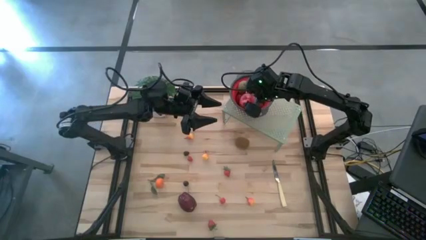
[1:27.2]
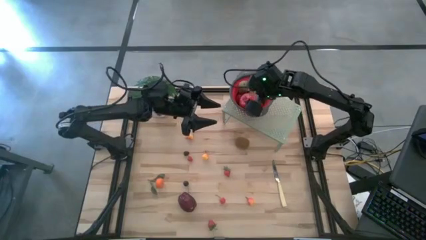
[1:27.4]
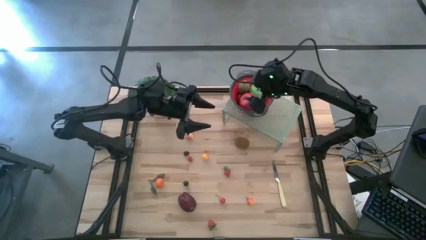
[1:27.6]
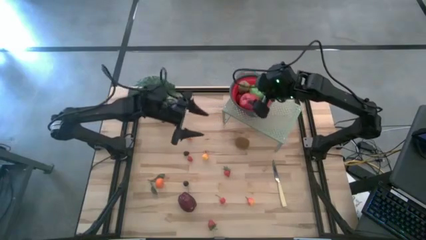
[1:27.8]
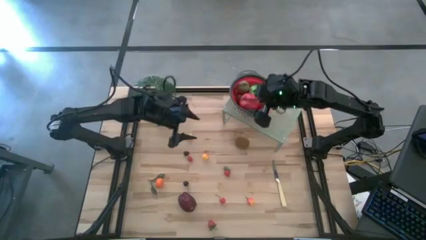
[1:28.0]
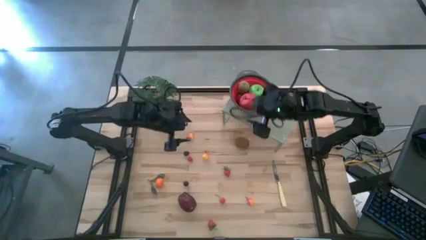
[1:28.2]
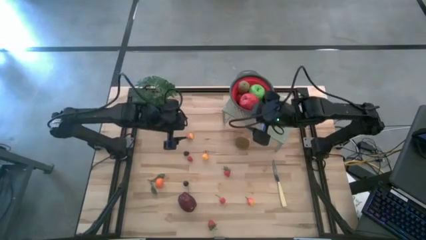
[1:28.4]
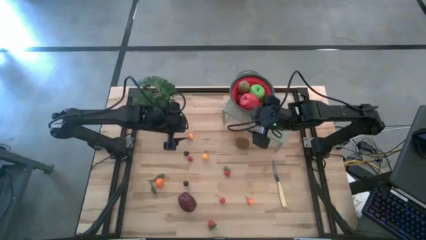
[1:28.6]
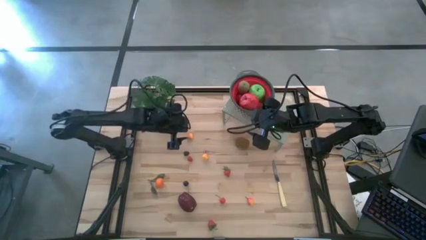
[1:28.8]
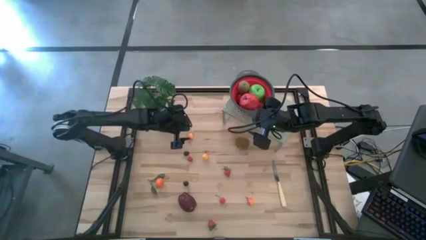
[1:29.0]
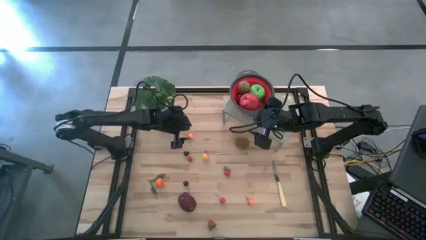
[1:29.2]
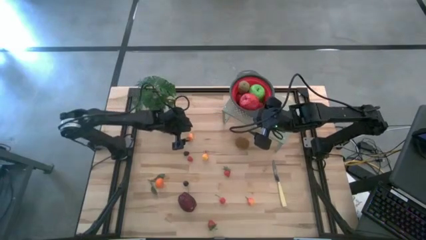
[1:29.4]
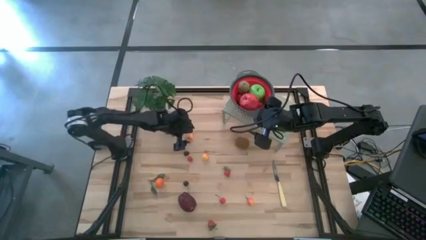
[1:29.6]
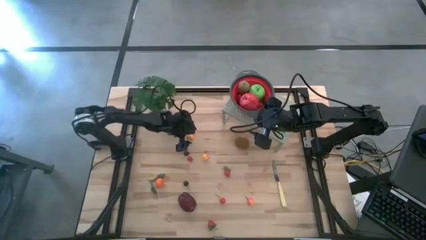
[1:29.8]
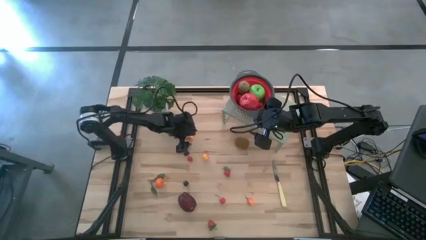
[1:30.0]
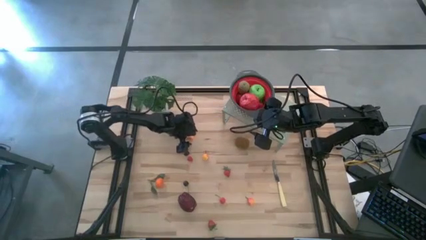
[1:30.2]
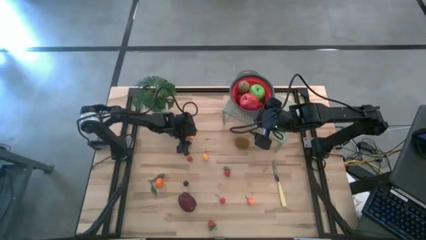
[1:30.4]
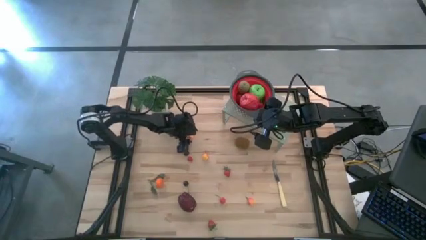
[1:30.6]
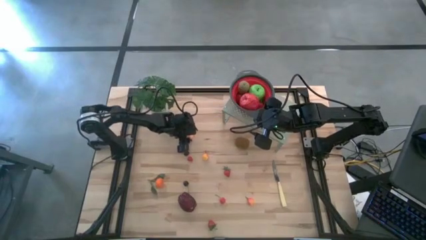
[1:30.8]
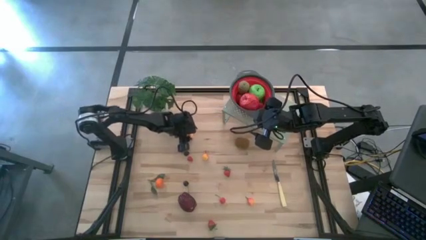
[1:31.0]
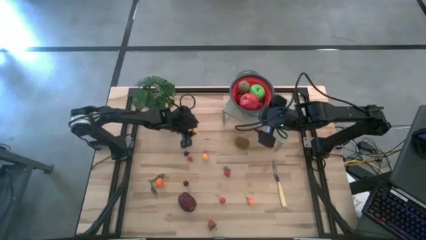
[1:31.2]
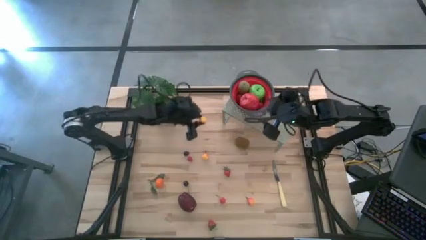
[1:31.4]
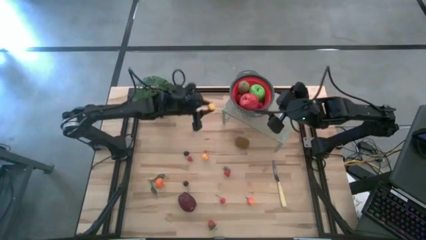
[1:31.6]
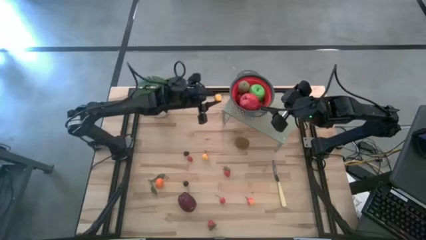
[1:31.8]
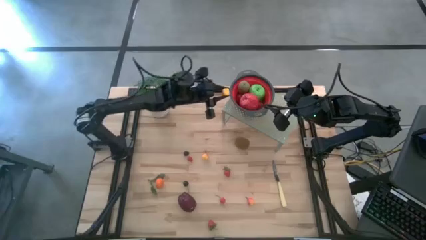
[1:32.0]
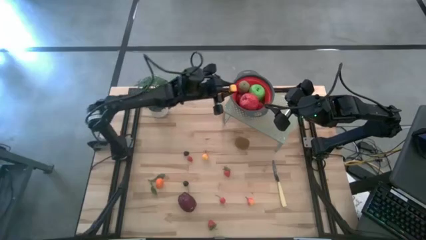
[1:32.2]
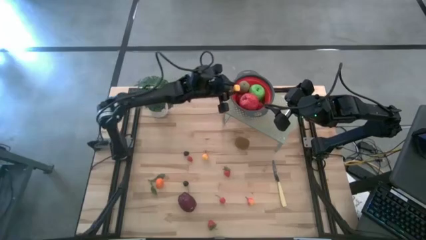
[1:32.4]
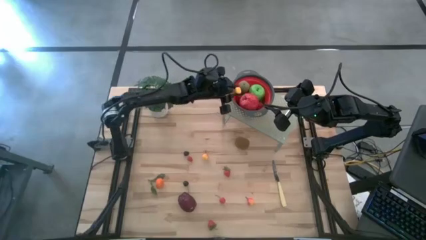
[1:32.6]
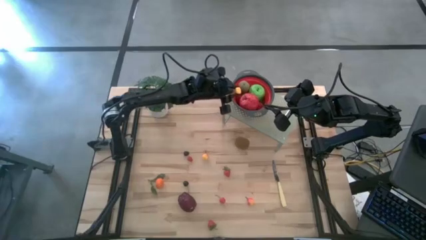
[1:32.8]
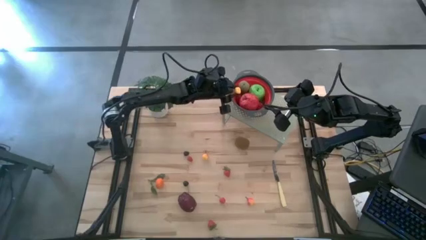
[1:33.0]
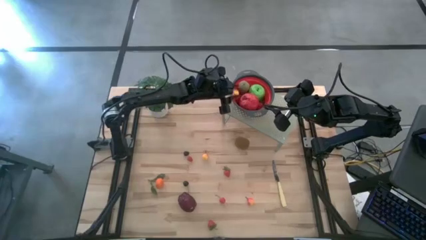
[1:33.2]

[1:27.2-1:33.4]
Task: Pick & Place Fruit
Put the yellow pear into the red strainer bowl

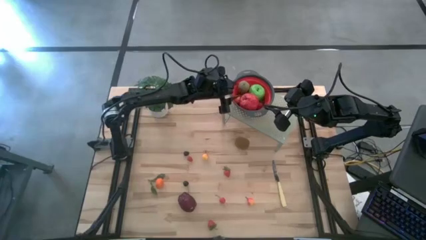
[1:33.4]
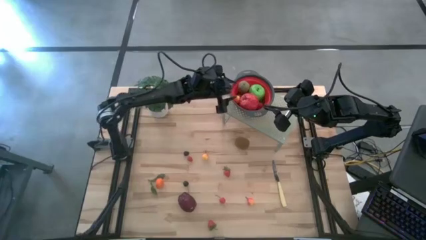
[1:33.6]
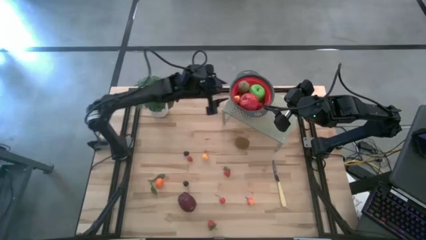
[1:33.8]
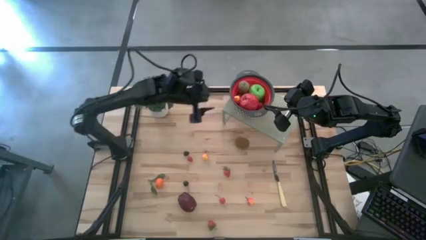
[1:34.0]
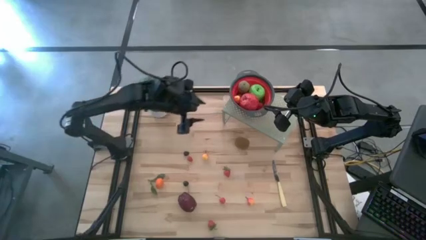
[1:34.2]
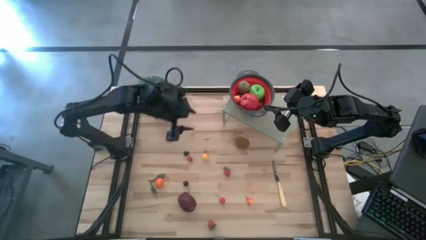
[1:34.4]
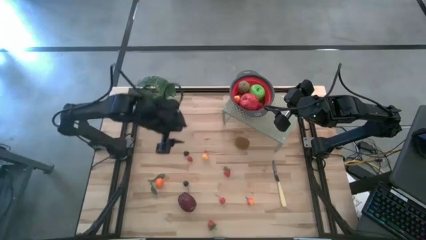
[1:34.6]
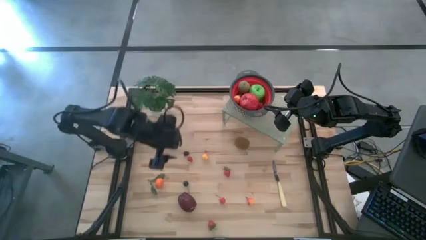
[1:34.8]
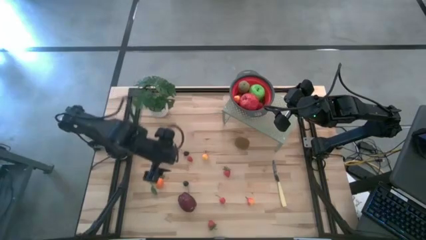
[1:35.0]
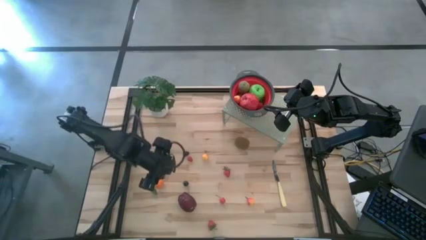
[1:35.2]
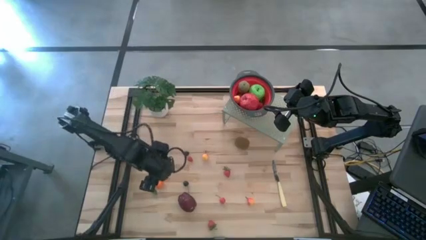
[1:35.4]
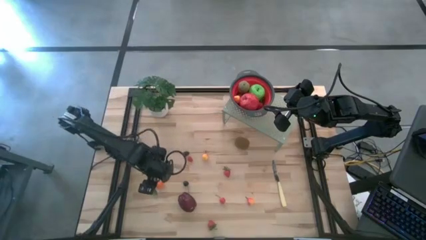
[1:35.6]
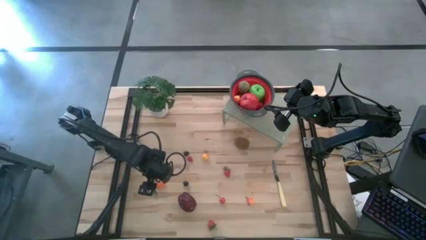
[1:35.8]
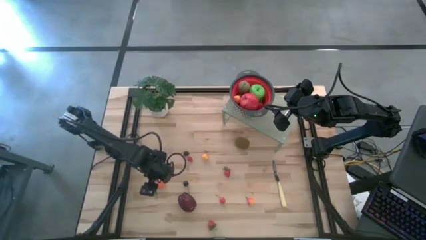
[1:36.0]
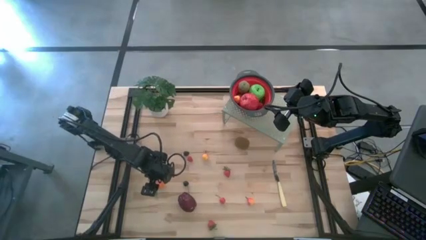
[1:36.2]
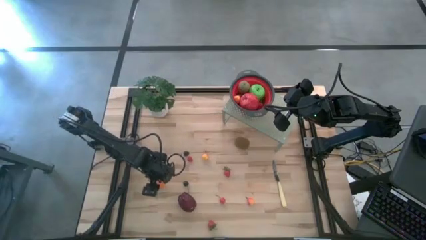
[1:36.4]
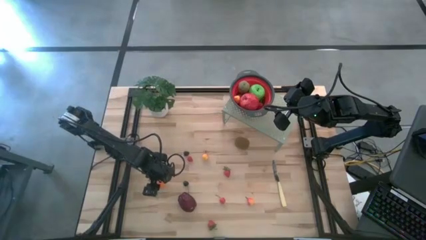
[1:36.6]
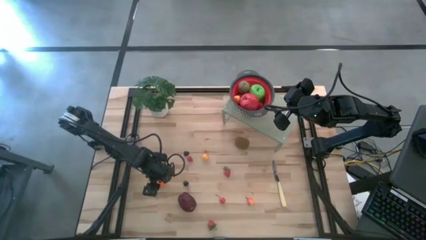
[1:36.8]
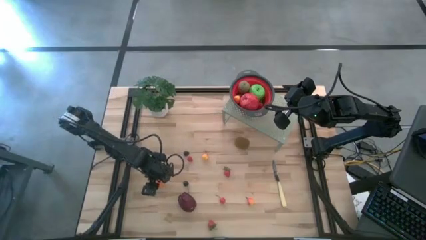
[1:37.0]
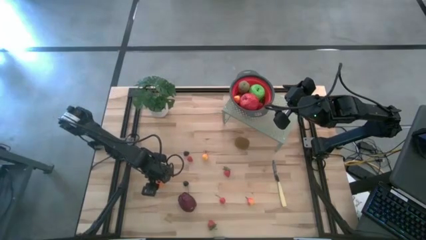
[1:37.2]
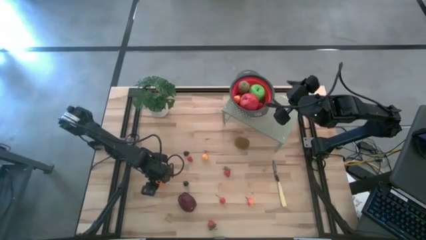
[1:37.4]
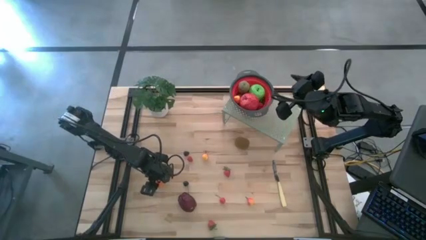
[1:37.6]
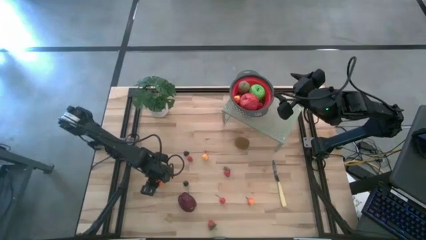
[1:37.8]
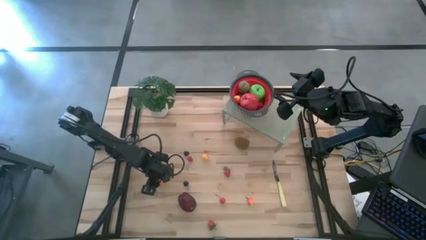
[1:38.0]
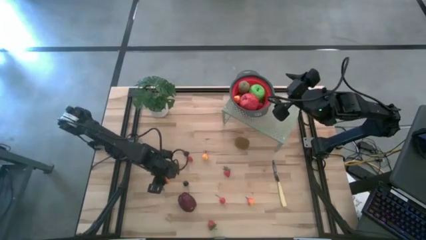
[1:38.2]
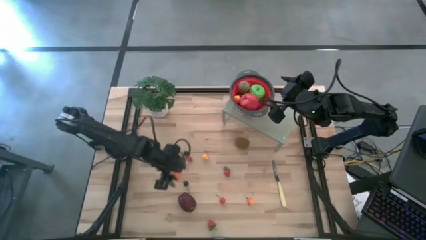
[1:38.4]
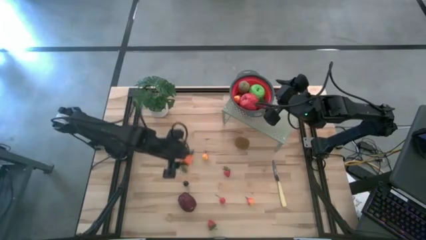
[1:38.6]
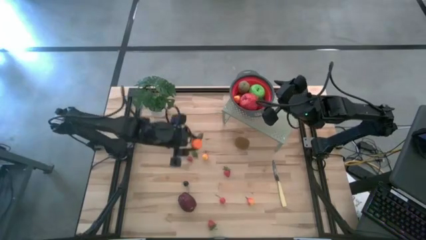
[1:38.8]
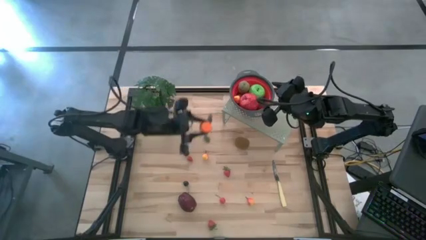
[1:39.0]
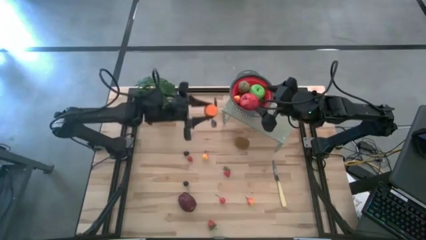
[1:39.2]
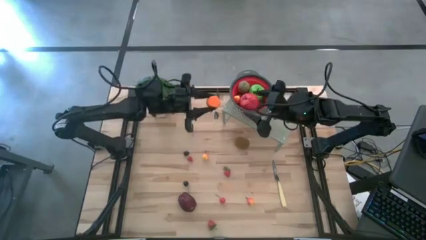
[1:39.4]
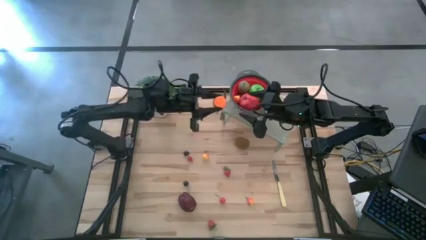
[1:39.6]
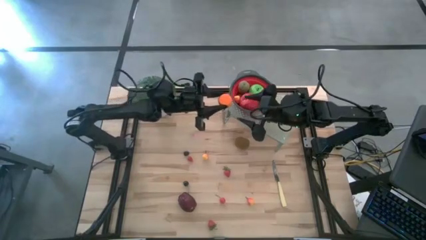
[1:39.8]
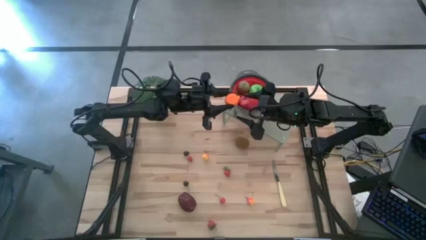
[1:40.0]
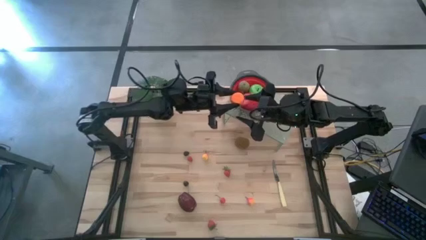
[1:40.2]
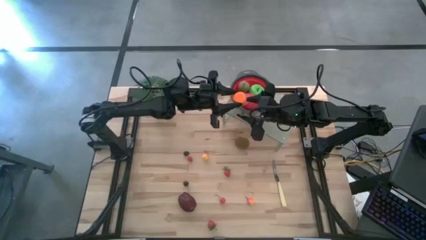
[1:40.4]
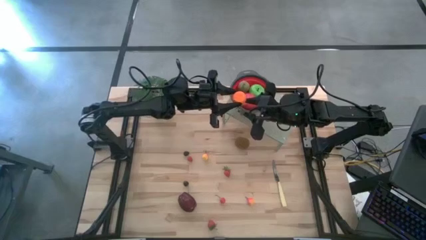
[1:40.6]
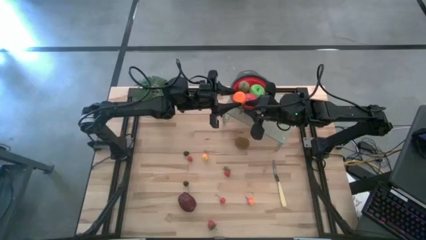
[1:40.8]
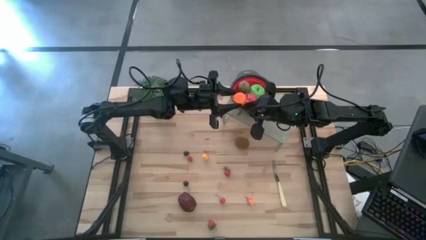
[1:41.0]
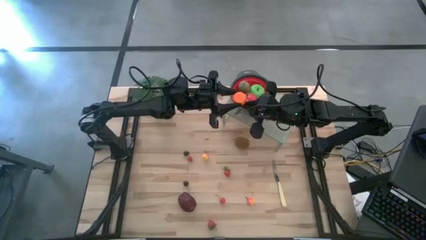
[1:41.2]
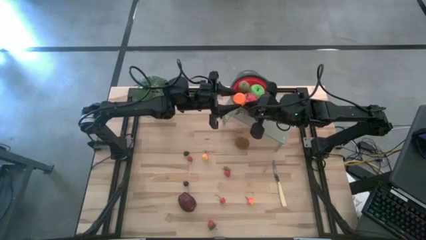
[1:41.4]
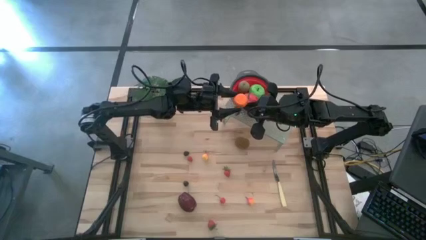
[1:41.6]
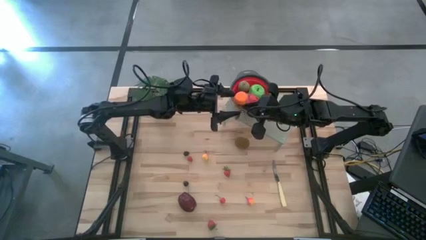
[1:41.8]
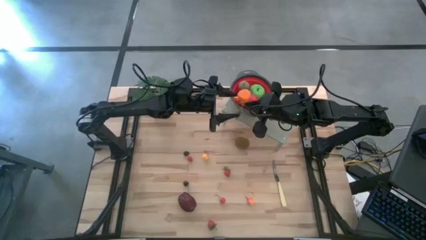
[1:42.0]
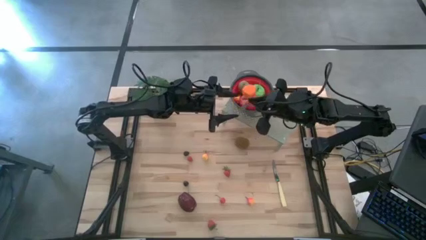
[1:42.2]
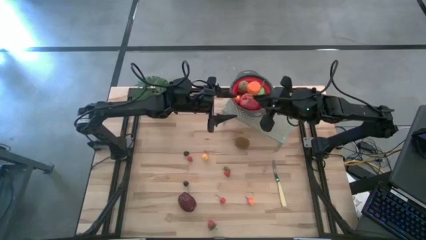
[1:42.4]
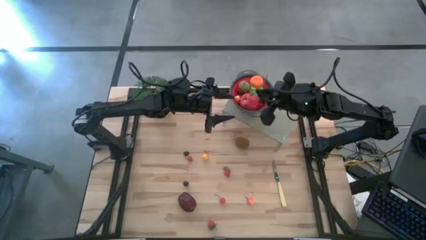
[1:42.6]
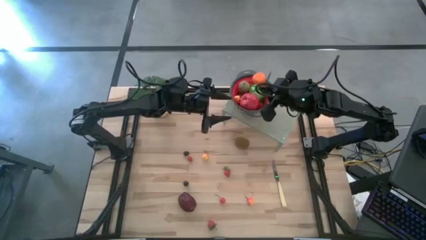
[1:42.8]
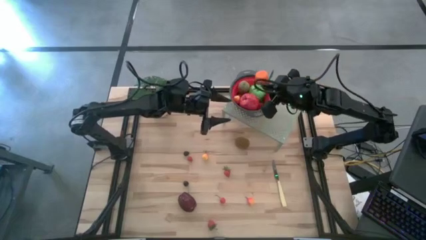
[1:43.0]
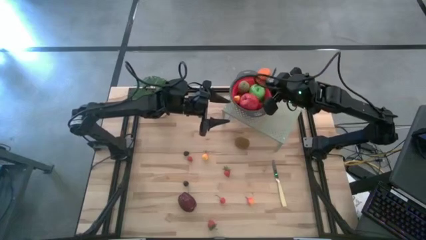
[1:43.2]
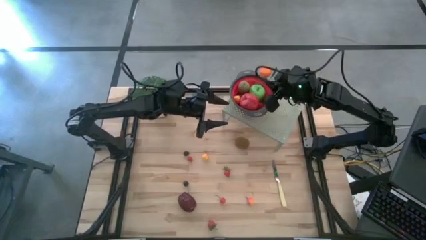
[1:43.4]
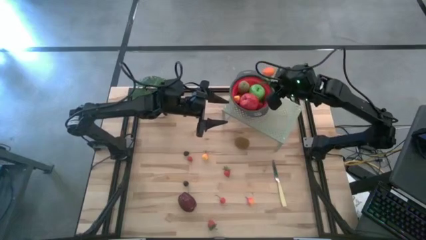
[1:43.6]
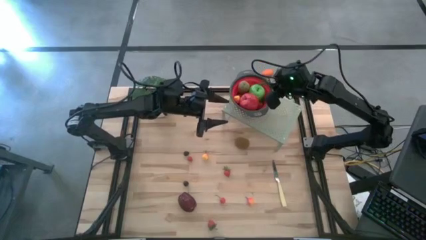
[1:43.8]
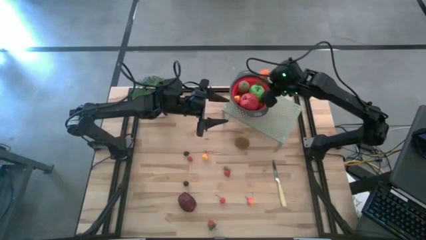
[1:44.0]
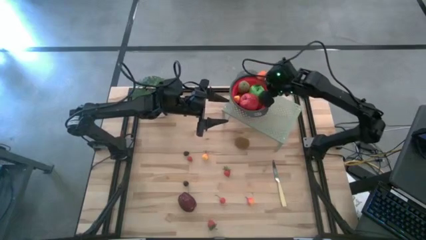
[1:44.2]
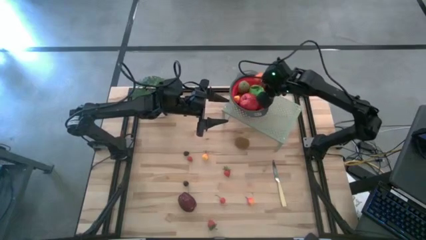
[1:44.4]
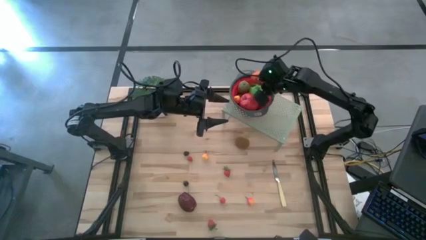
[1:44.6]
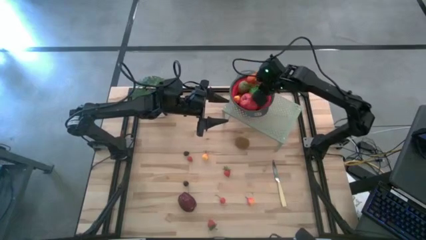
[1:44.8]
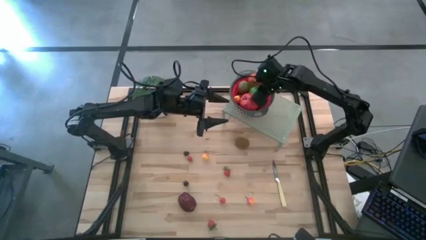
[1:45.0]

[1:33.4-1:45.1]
Put the orange tangerine into the red strainer bowl
